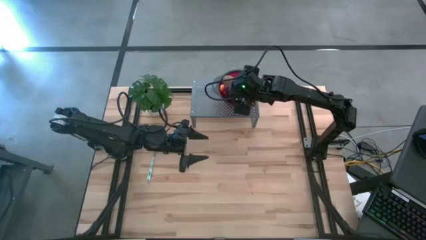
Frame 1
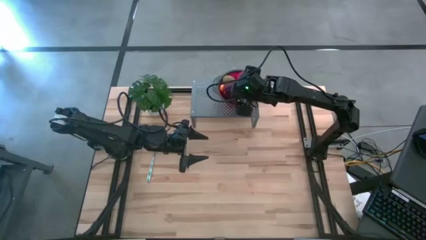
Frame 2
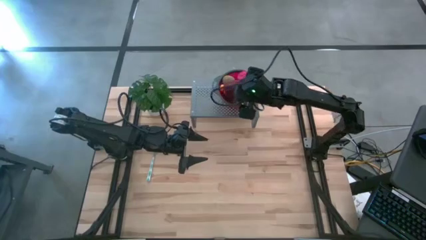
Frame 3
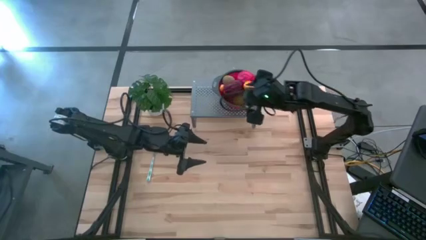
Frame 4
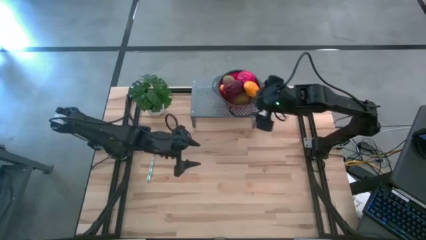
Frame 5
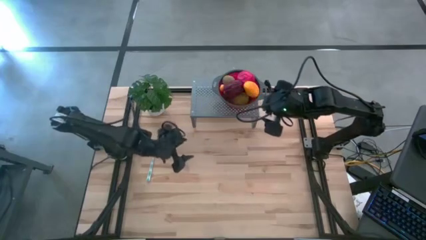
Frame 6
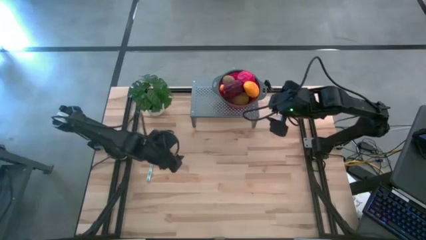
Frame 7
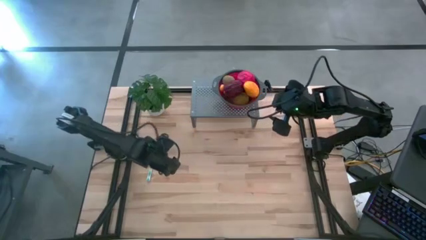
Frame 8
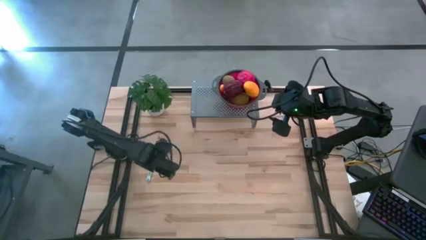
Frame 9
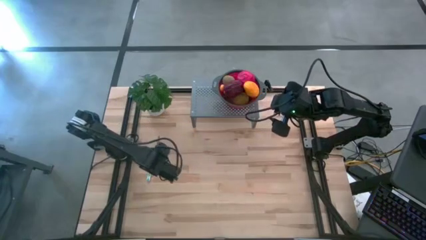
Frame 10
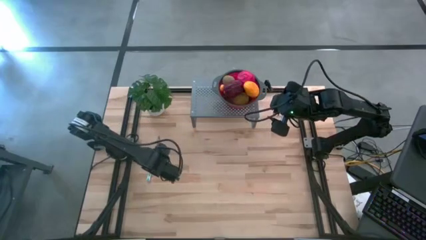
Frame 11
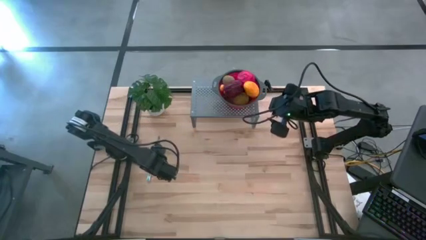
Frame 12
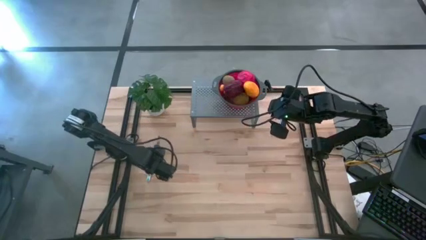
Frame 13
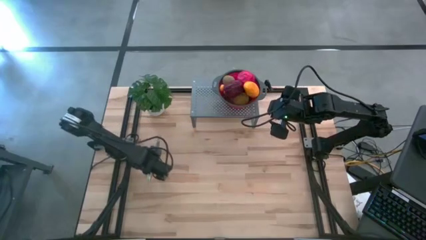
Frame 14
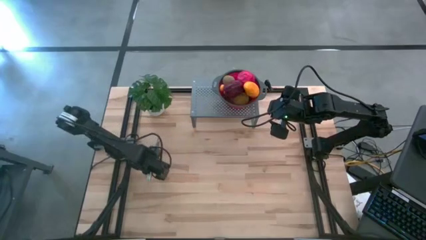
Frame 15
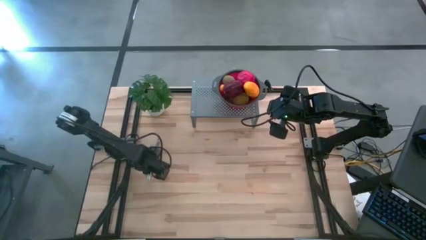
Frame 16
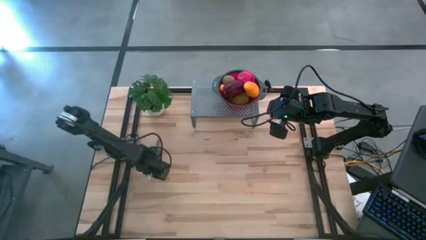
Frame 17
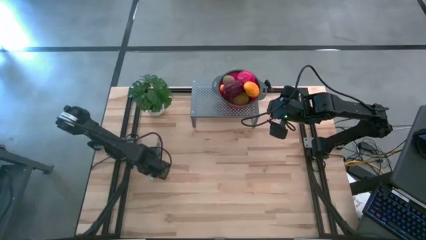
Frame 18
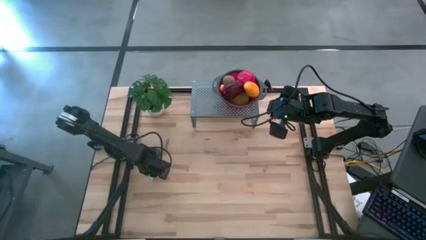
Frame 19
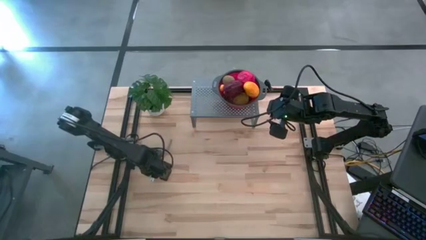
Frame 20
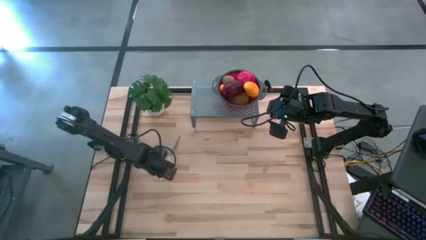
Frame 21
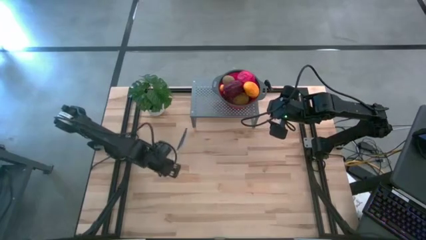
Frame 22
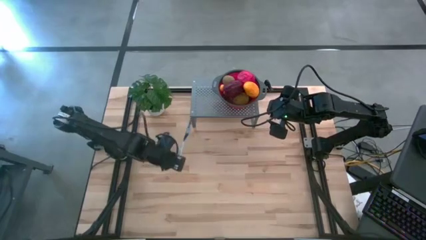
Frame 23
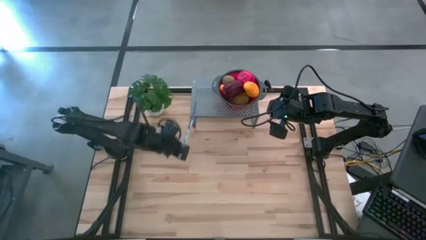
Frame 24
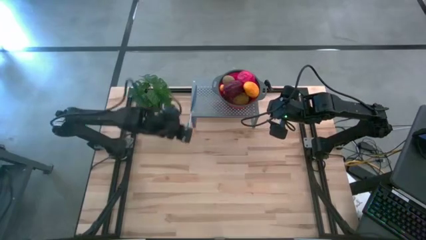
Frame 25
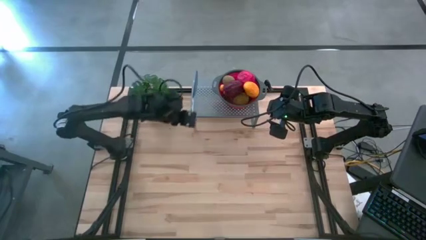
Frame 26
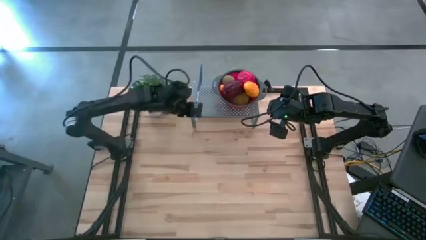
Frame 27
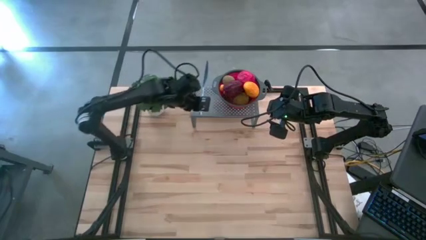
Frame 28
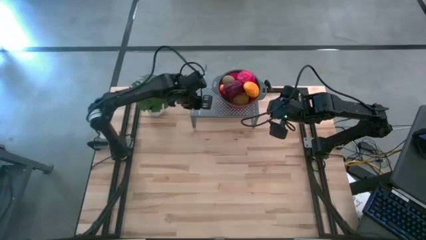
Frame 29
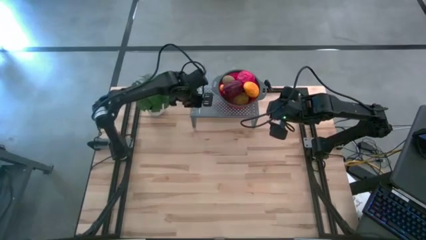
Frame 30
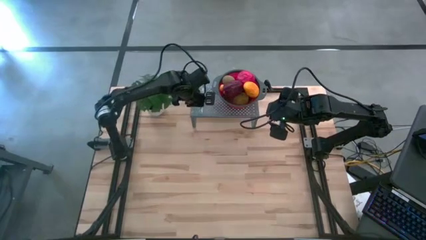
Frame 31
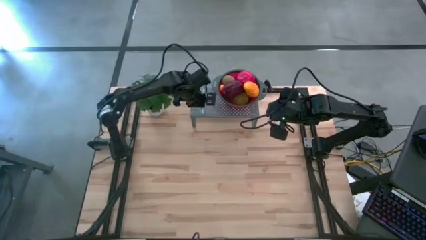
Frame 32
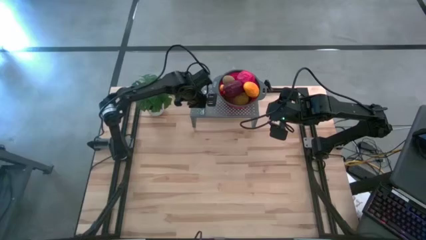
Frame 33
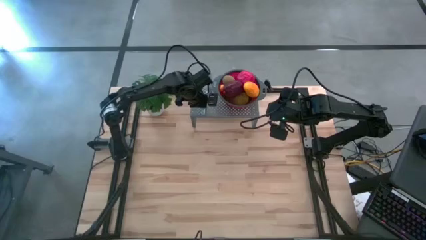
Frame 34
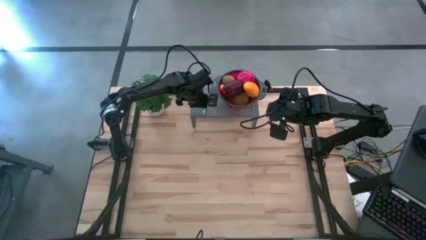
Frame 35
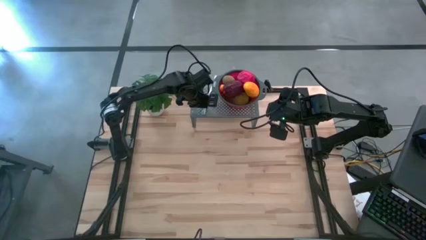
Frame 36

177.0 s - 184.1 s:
Task: Pick & Place Fruit
Put the table knife on the shelf

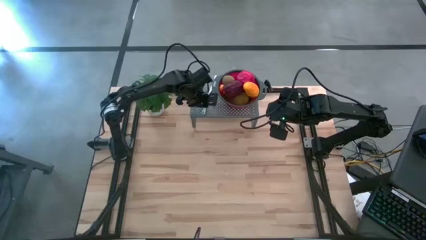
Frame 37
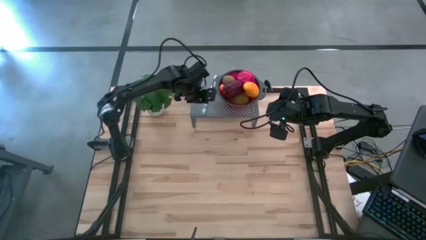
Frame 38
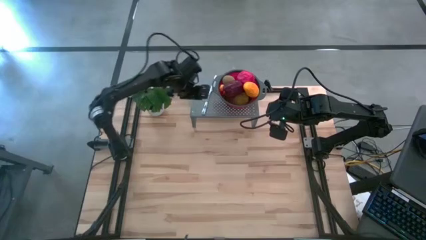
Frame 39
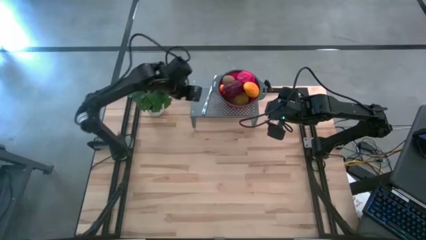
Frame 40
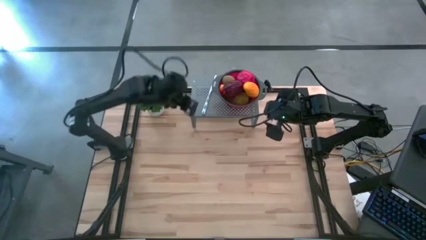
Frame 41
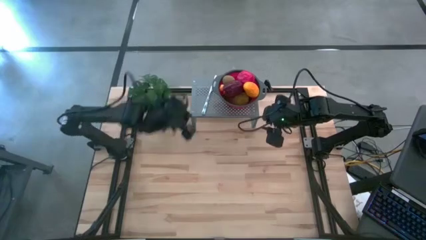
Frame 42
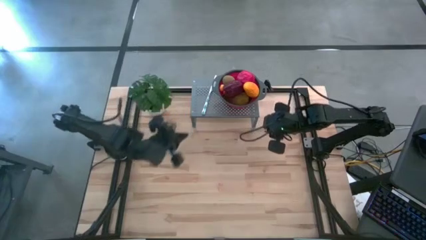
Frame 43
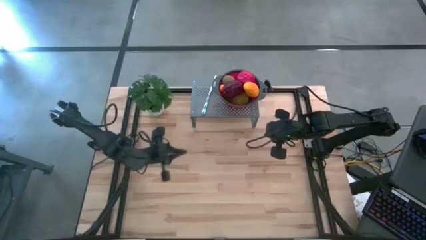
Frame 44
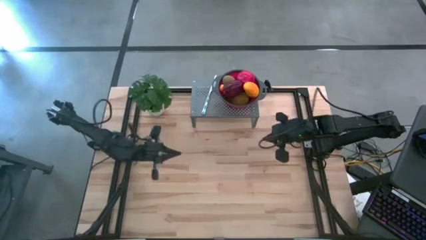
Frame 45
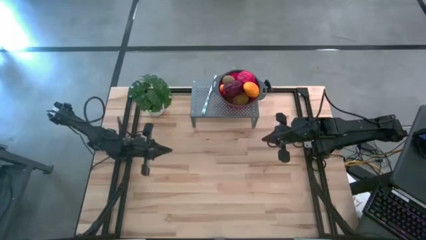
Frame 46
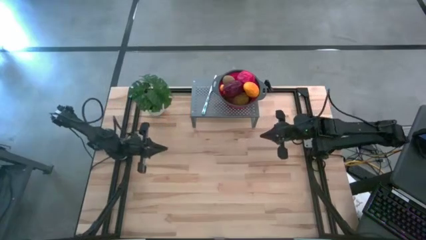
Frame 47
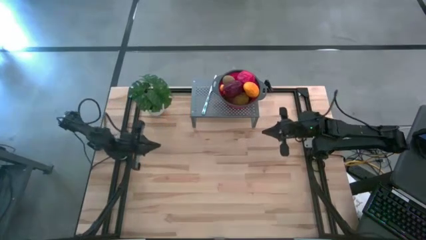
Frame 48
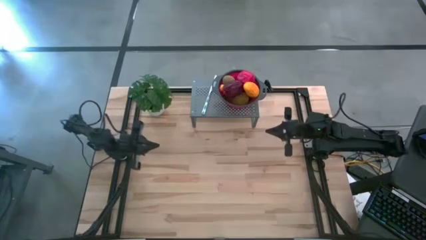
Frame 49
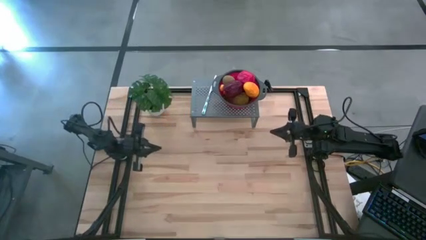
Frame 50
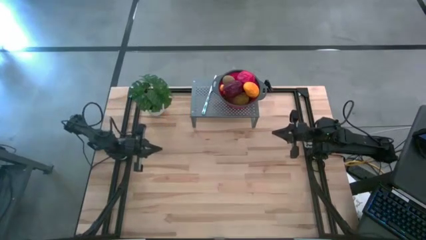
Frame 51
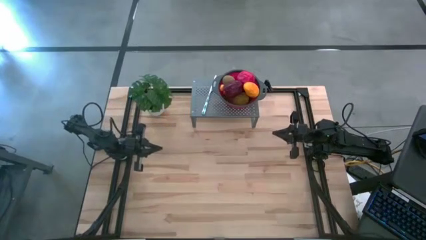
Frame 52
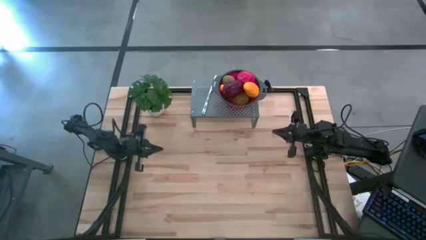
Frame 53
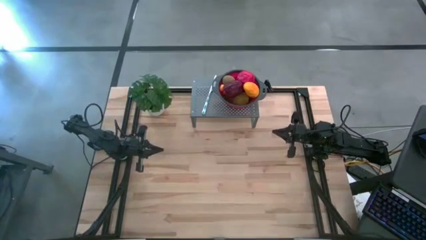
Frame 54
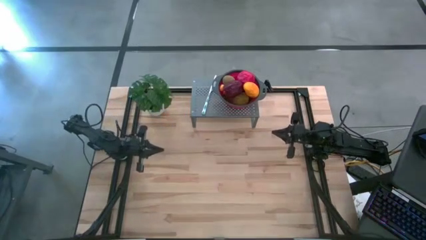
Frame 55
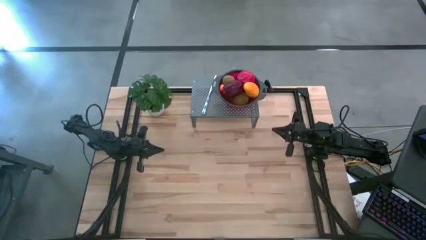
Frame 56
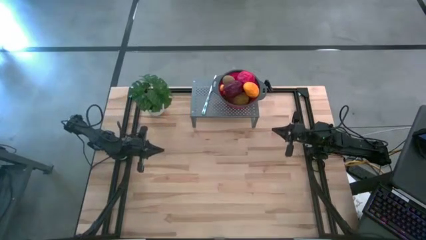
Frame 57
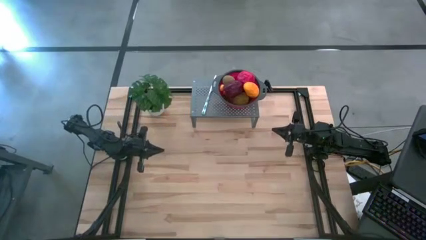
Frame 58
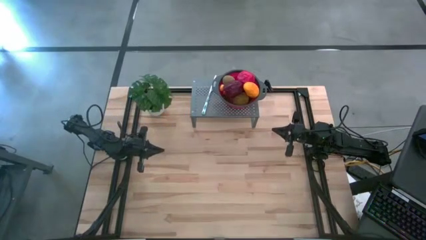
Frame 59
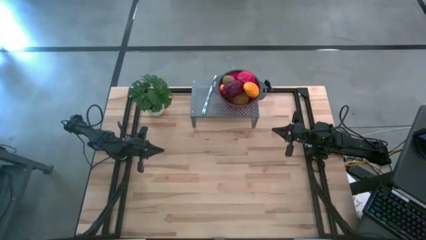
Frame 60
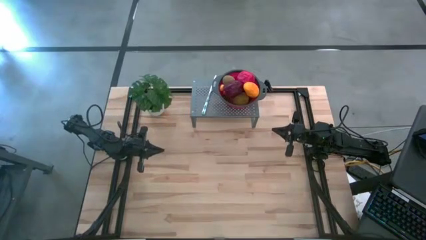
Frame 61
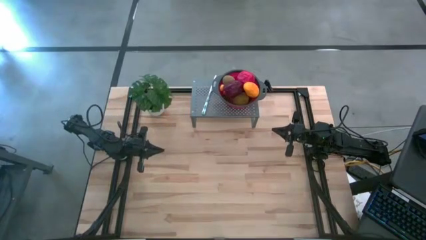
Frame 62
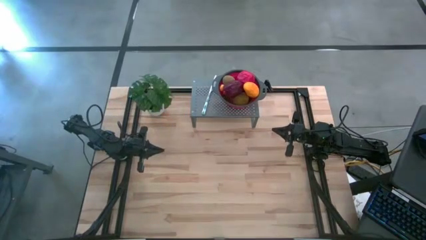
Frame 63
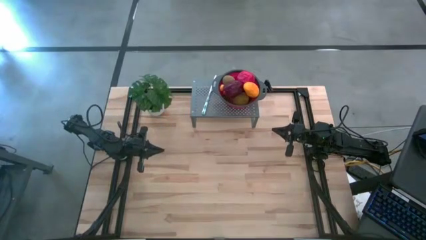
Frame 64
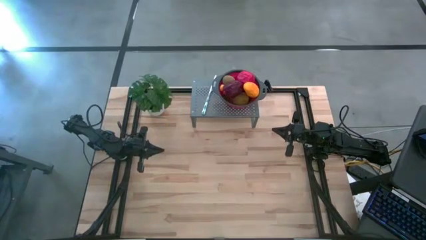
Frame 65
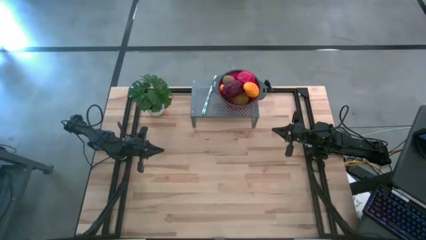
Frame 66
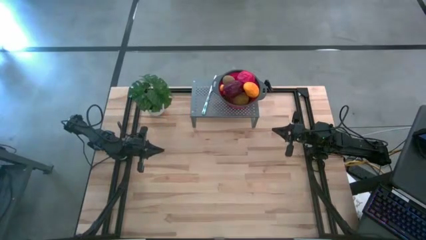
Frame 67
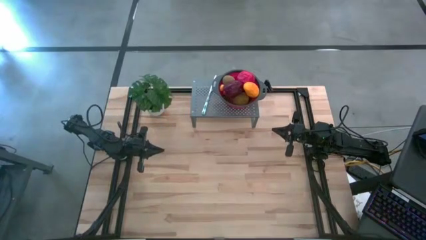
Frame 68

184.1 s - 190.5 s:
Return to Home Position
